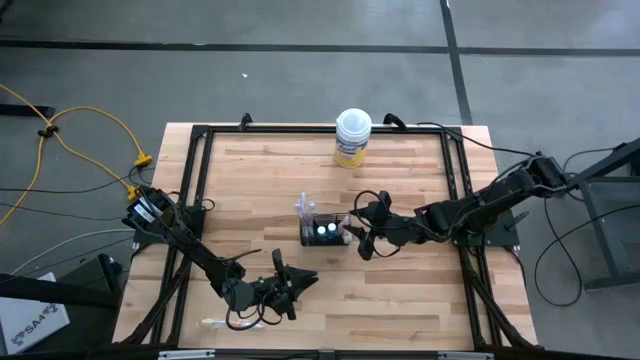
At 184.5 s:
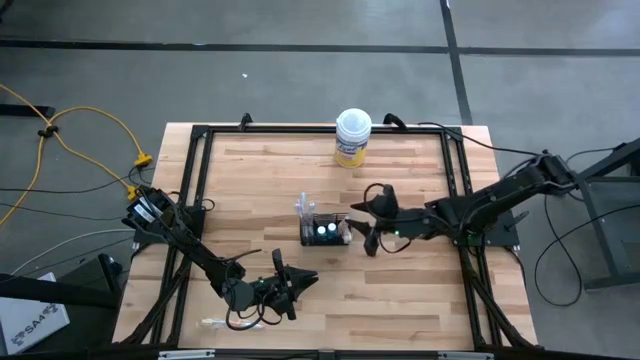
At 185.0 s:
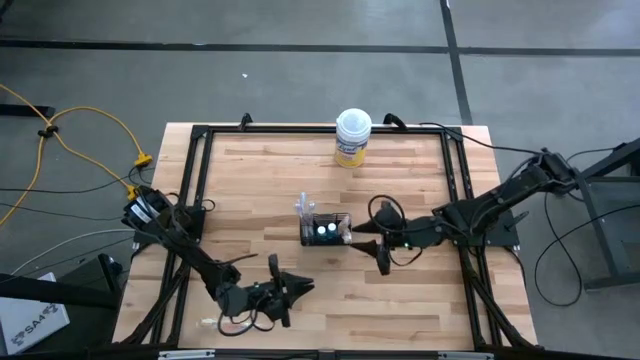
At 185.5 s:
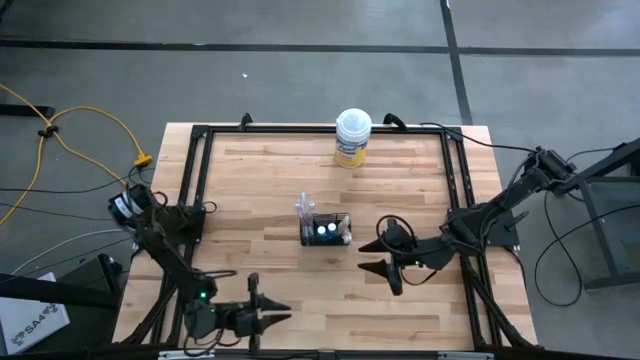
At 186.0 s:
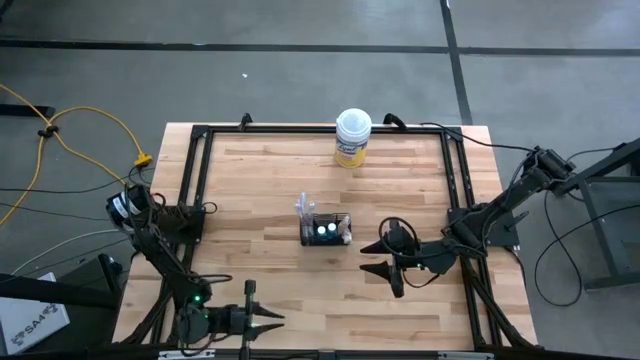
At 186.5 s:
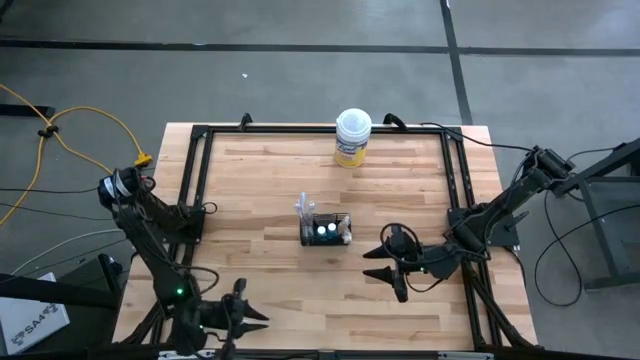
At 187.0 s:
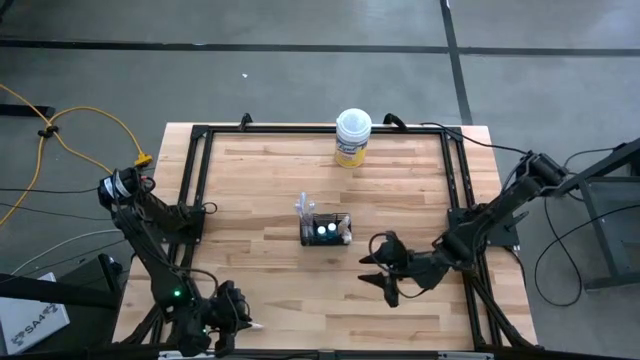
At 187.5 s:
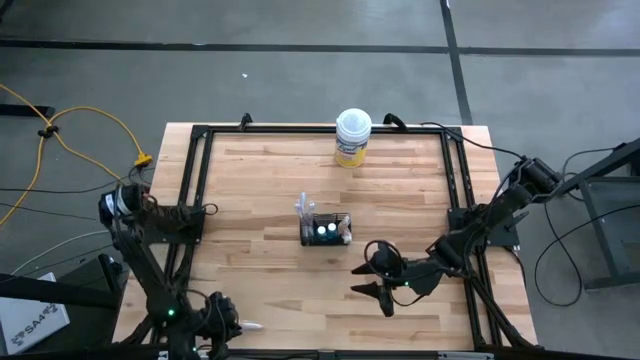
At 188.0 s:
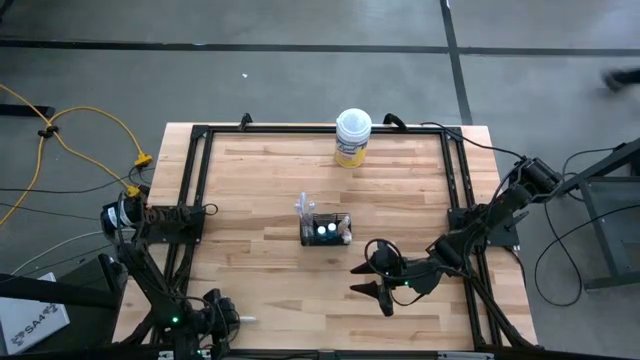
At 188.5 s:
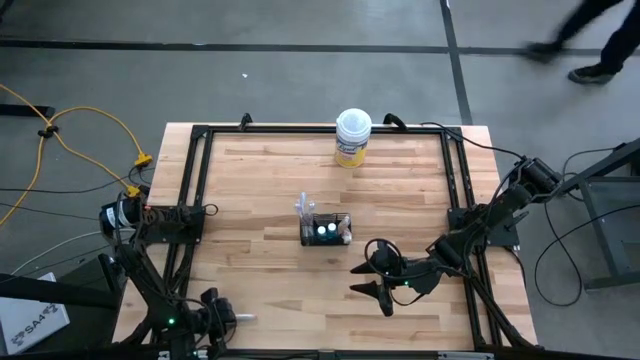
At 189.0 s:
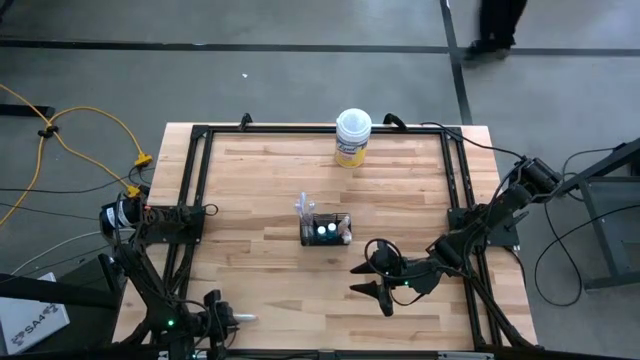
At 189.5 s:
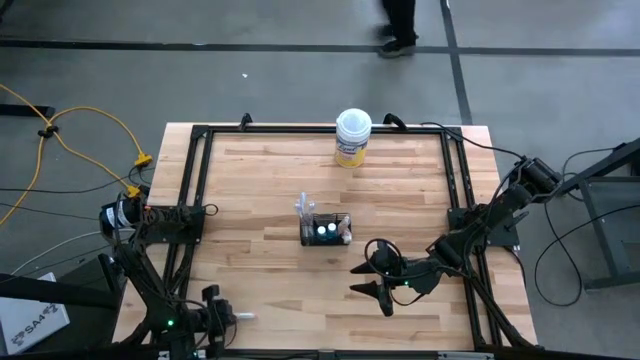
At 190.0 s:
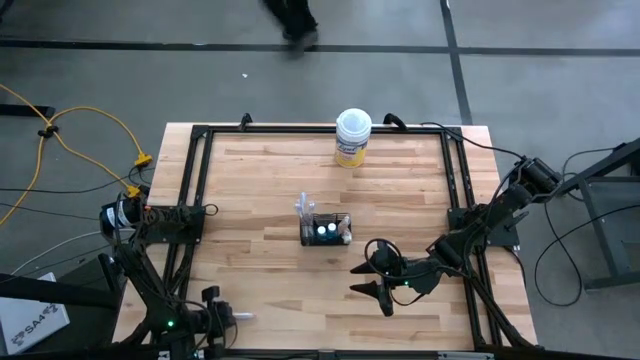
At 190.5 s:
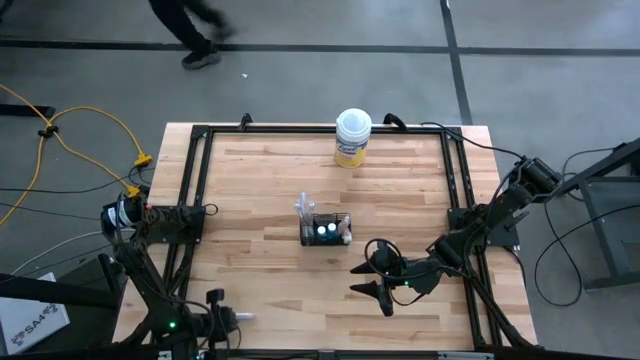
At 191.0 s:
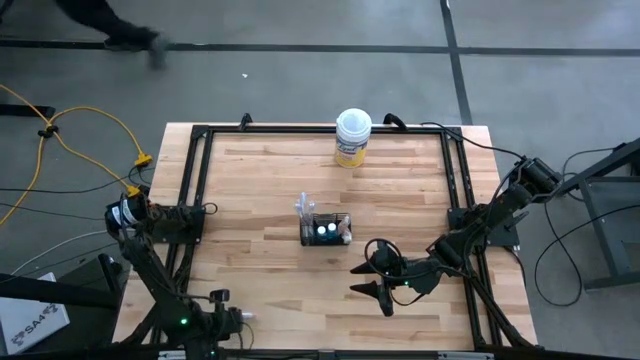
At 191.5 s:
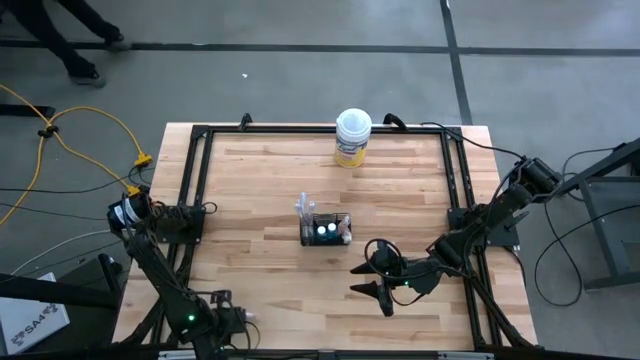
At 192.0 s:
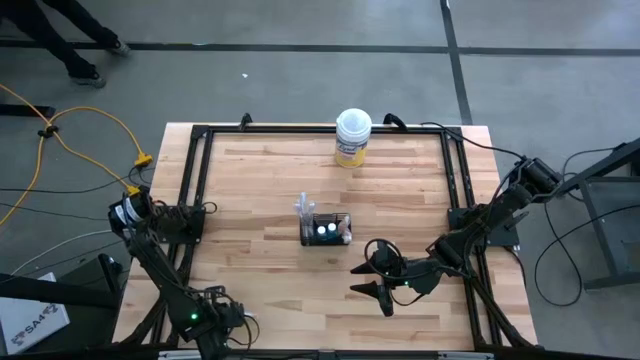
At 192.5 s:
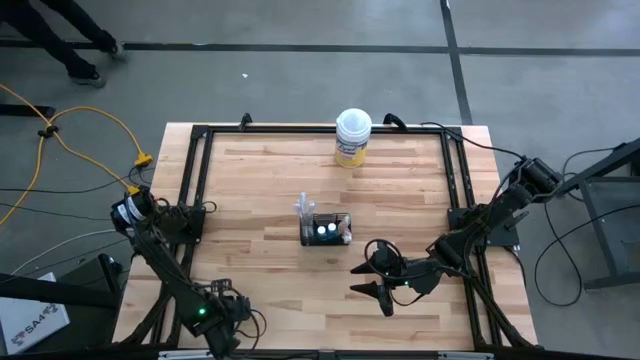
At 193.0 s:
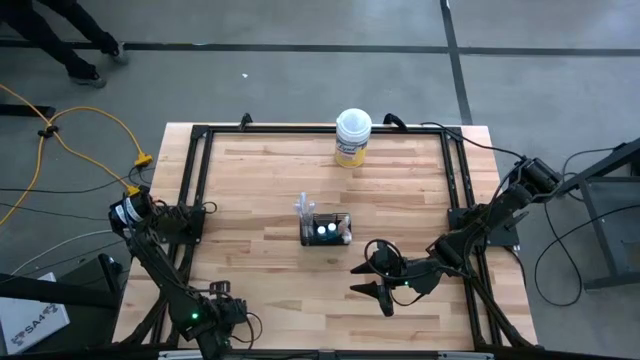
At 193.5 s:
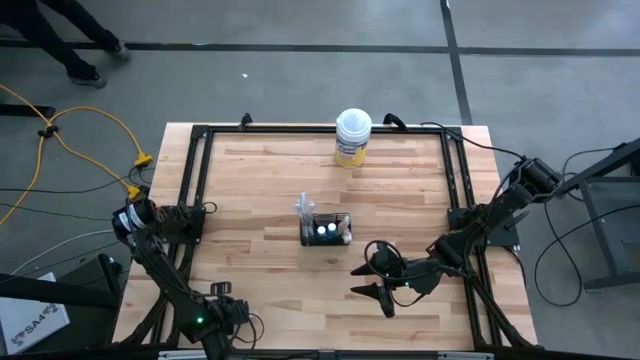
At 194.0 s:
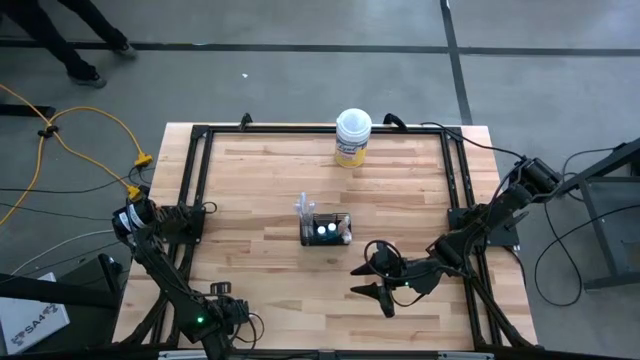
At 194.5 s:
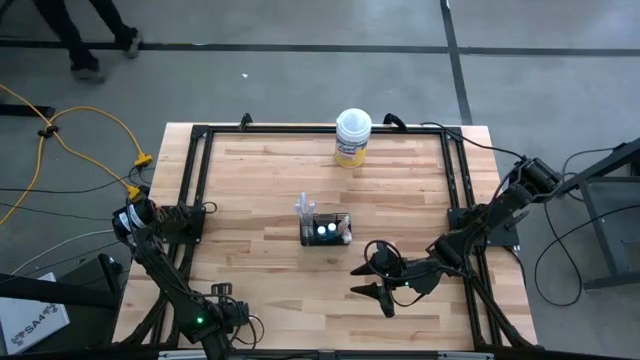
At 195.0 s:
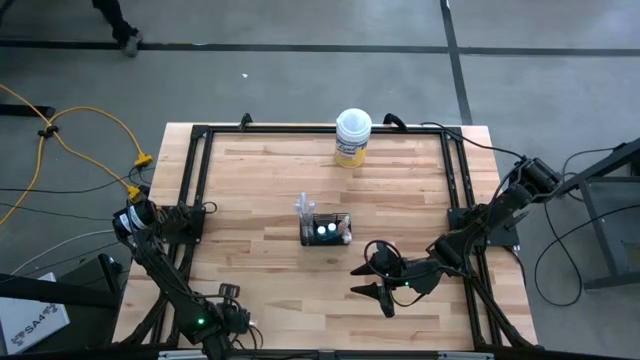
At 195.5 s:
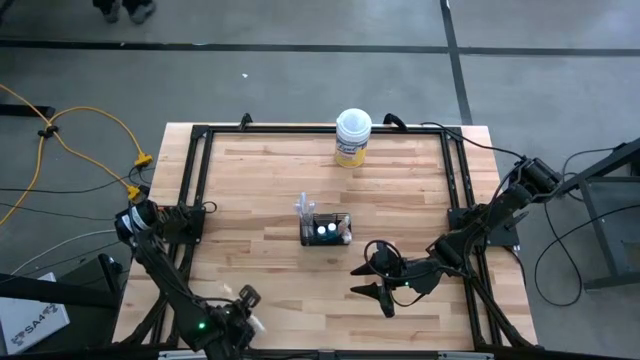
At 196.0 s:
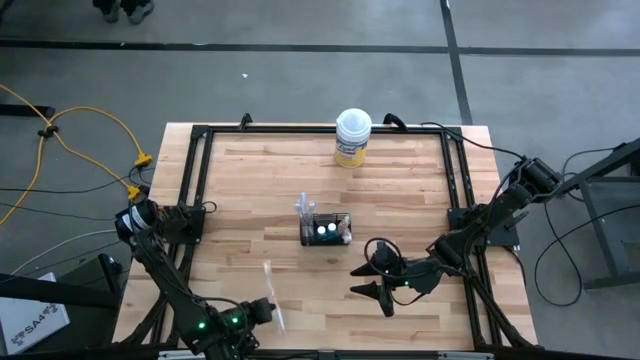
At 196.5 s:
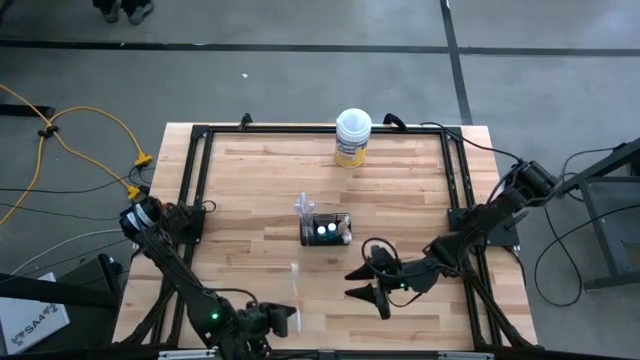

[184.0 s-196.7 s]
Task: Pick & Place toothbrushing station
Put the orange toothbrush into the wire organizer

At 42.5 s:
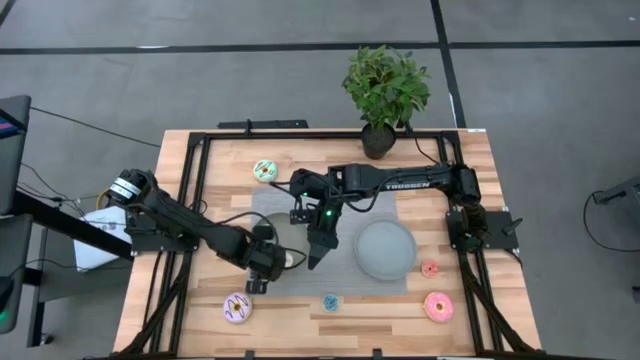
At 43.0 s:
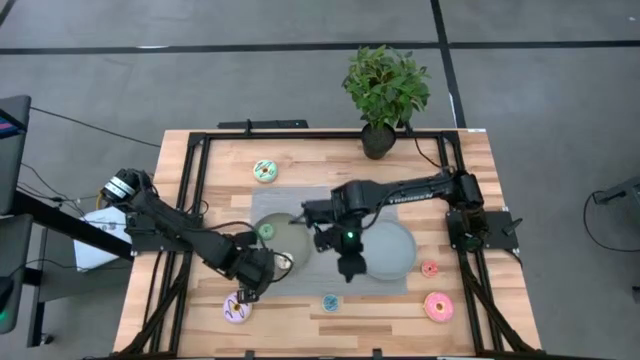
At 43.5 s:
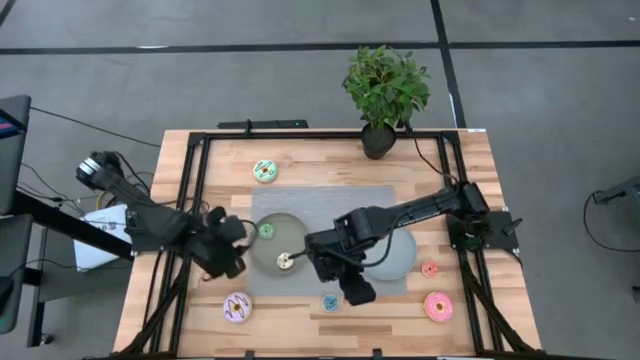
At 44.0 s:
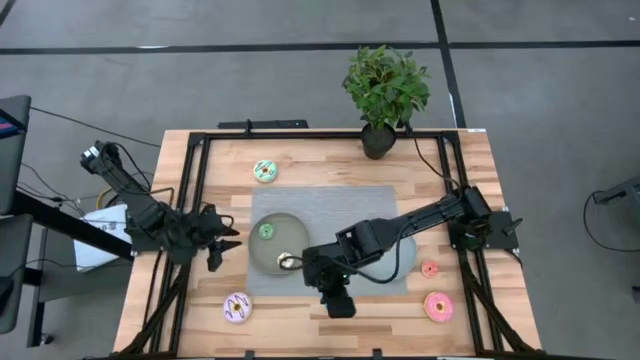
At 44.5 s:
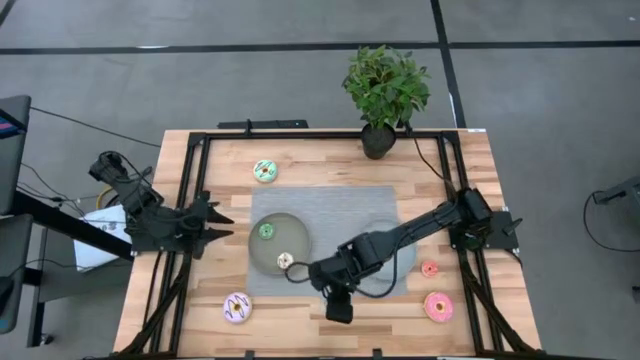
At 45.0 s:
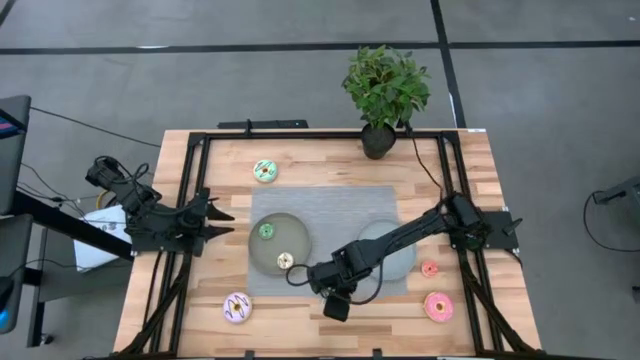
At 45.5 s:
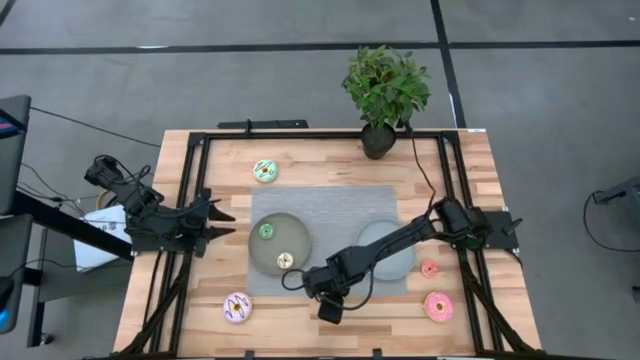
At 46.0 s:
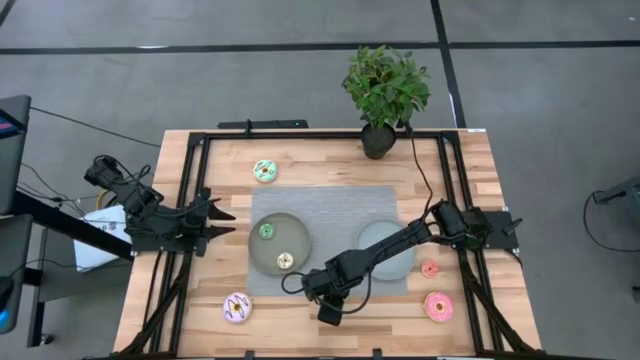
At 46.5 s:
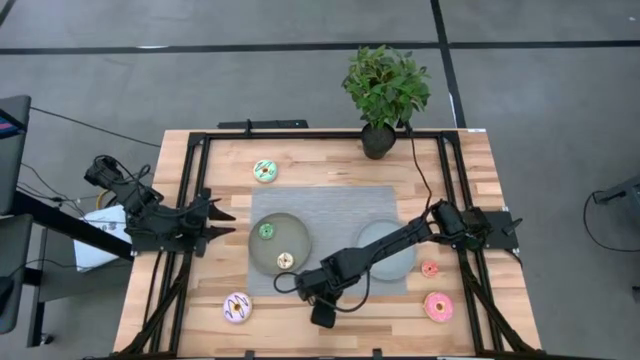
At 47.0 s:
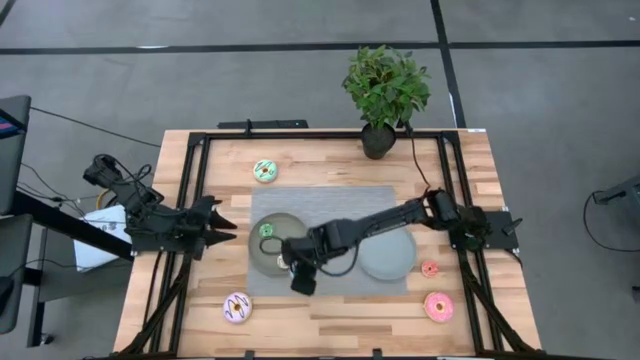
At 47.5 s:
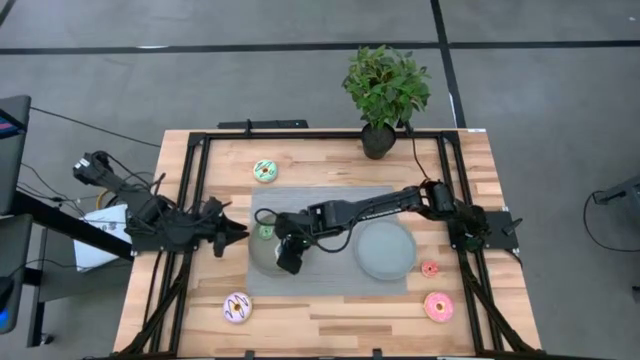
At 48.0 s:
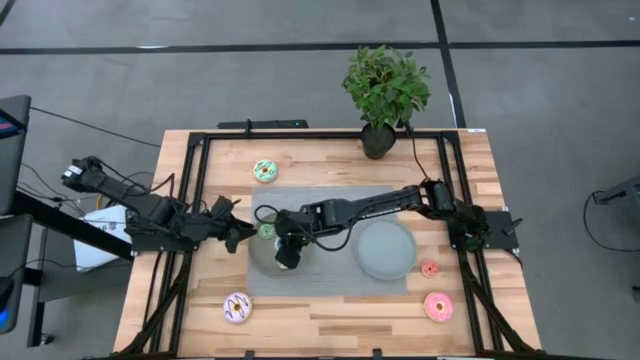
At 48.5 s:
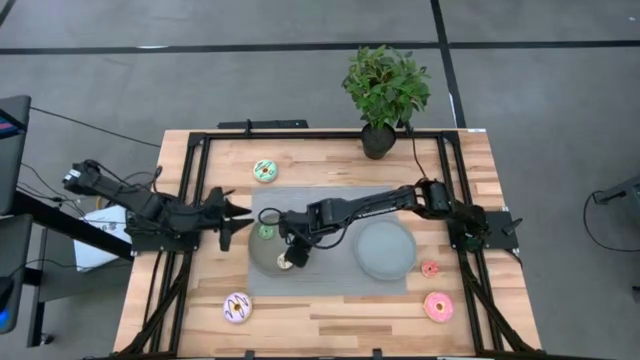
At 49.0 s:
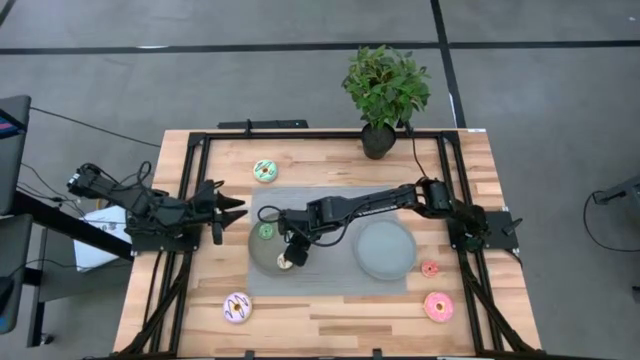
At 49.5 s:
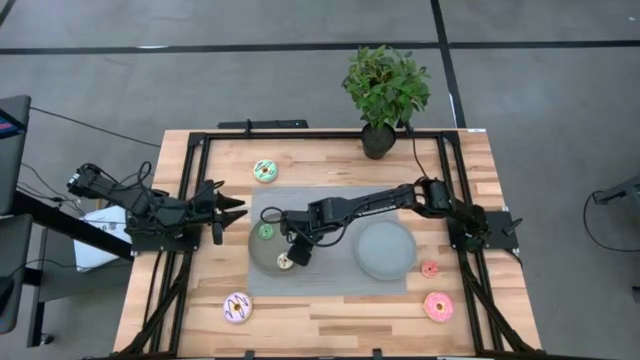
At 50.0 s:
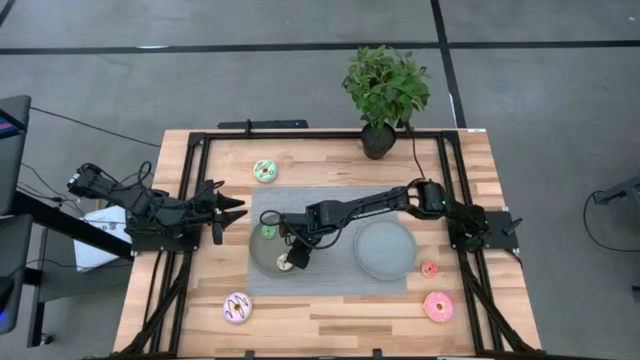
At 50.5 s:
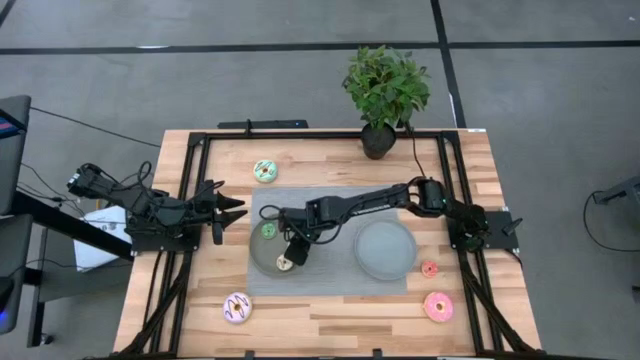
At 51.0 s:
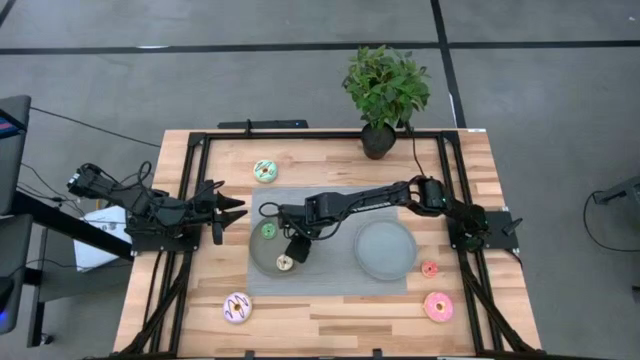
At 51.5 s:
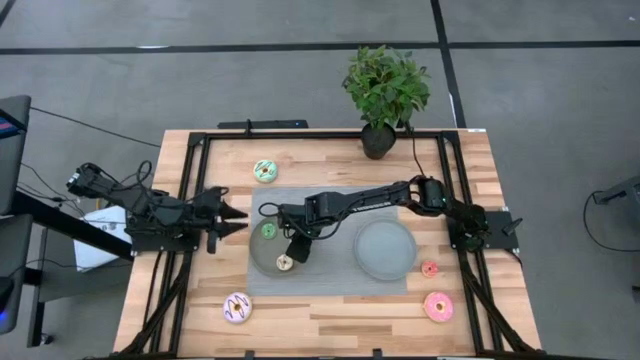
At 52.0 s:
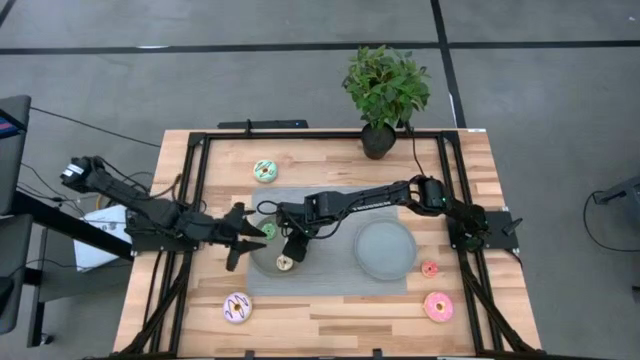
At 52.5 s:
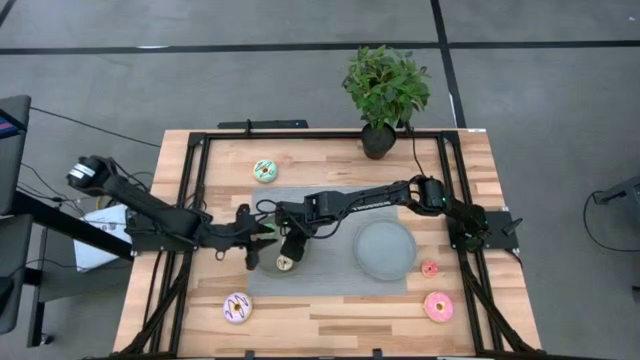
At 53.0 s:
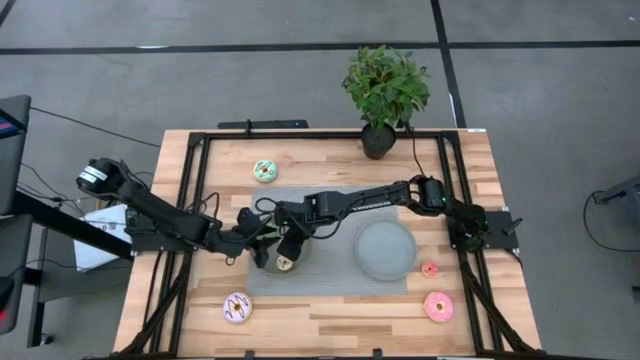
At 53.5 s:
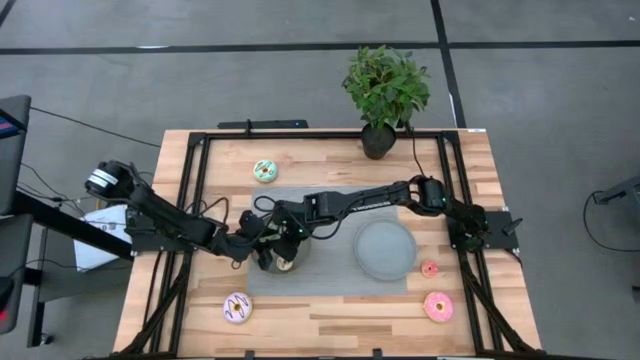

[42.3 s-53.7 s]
Task: Pick & Place donuts
Put the small blue donut on the dark gray plate
